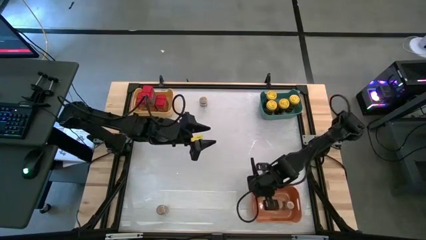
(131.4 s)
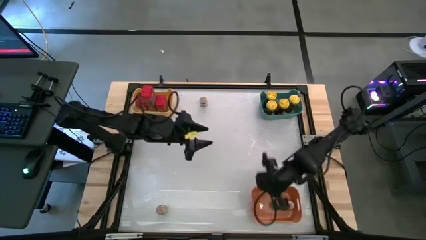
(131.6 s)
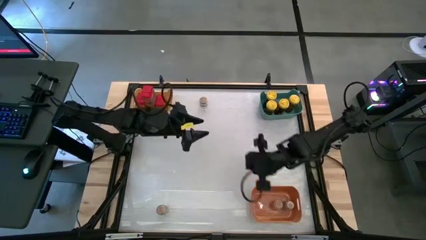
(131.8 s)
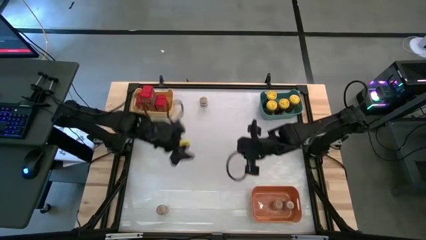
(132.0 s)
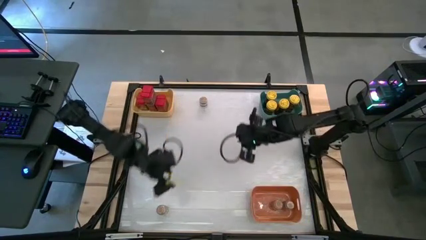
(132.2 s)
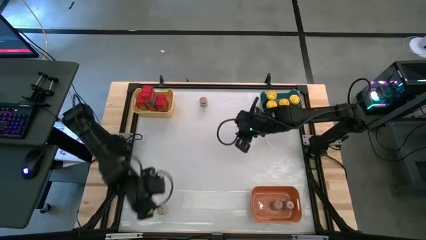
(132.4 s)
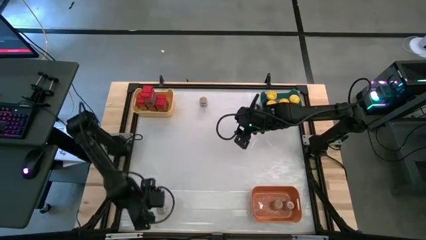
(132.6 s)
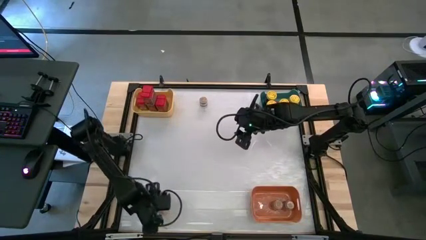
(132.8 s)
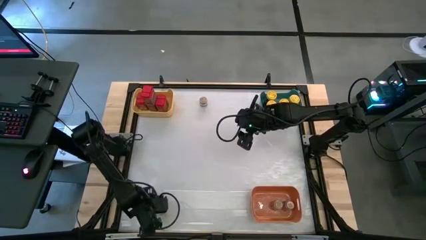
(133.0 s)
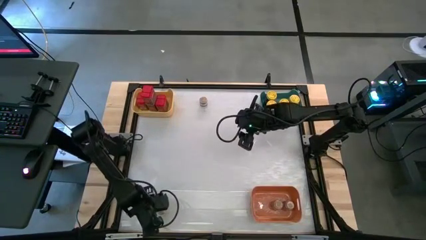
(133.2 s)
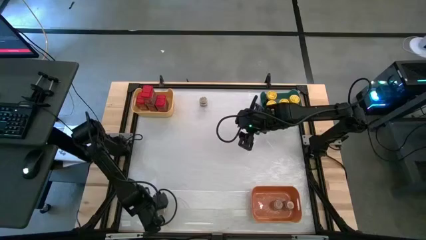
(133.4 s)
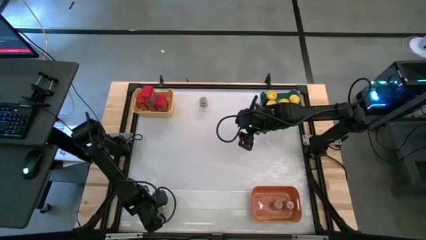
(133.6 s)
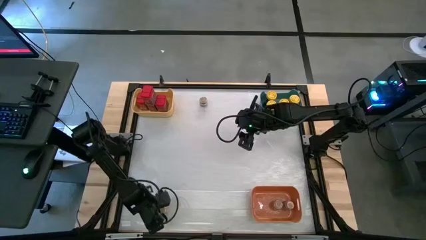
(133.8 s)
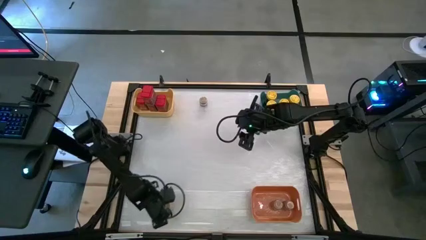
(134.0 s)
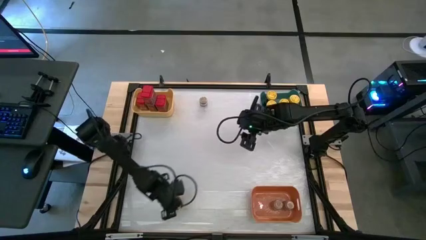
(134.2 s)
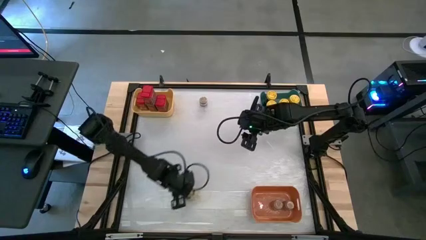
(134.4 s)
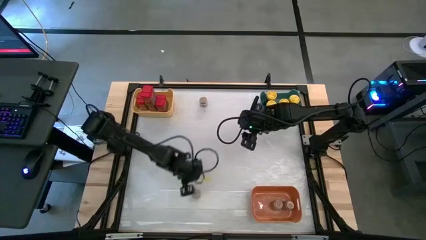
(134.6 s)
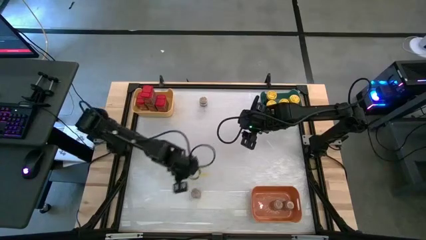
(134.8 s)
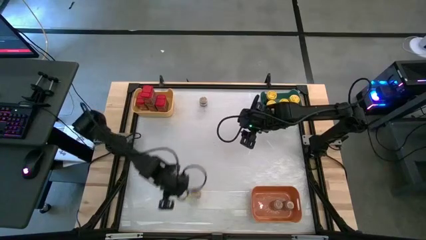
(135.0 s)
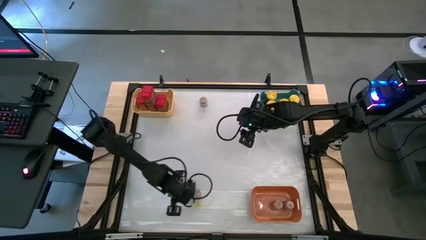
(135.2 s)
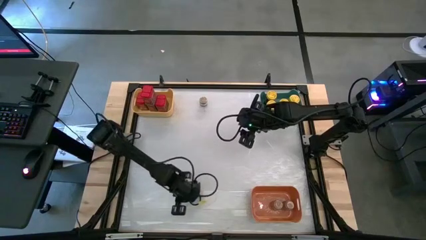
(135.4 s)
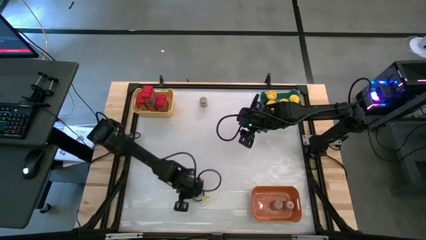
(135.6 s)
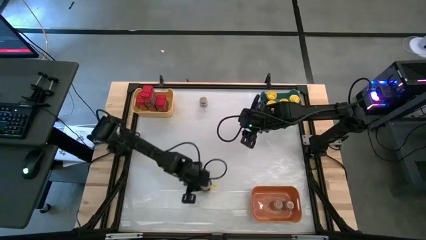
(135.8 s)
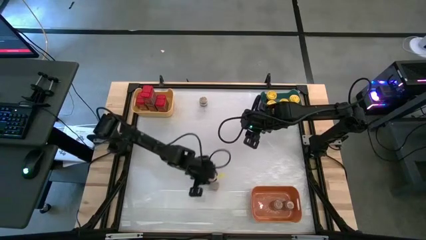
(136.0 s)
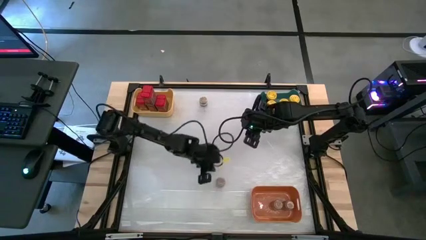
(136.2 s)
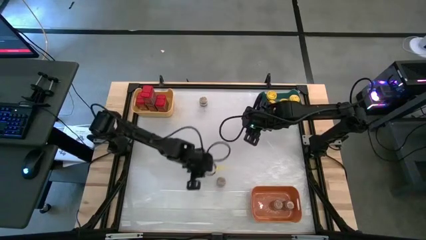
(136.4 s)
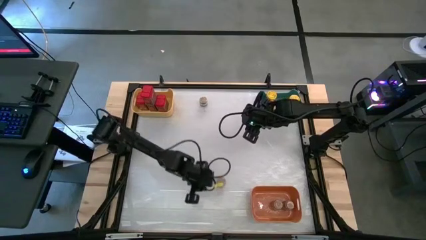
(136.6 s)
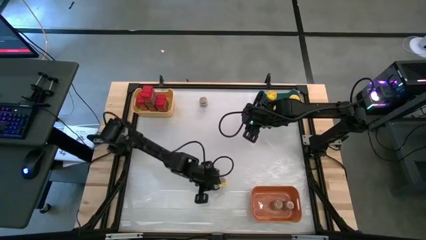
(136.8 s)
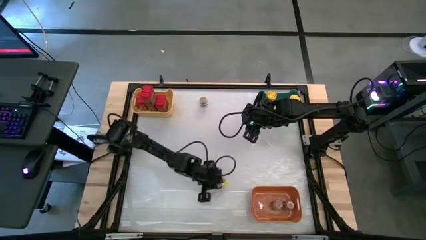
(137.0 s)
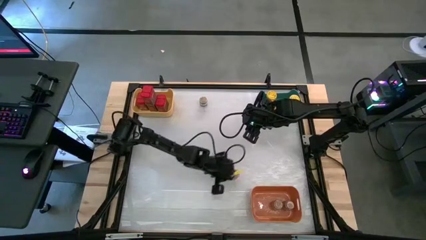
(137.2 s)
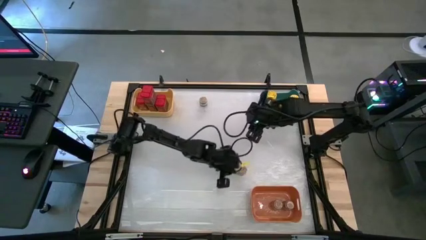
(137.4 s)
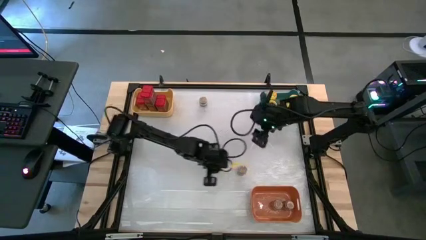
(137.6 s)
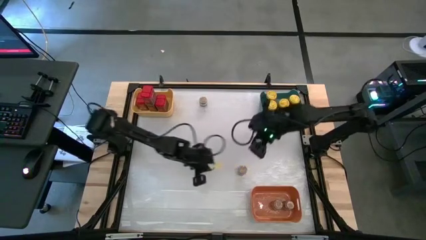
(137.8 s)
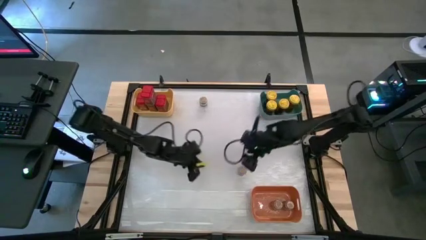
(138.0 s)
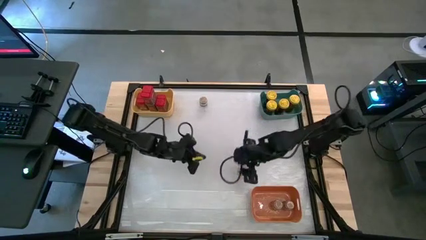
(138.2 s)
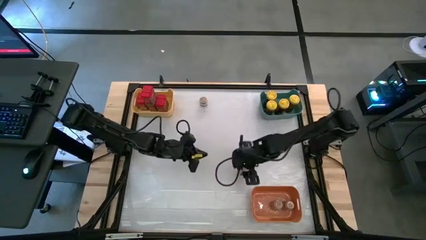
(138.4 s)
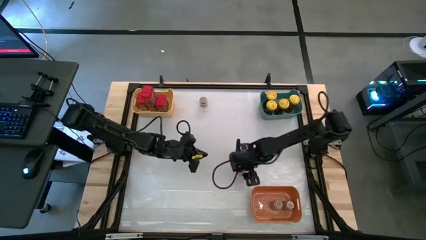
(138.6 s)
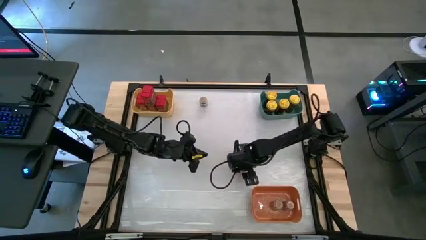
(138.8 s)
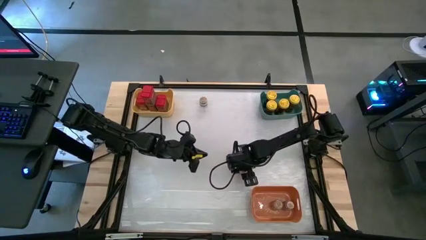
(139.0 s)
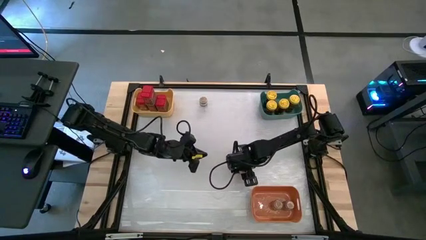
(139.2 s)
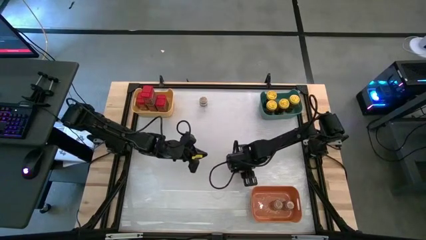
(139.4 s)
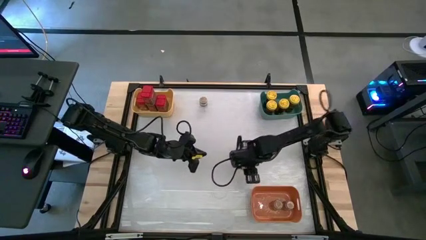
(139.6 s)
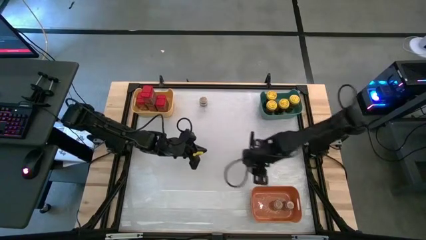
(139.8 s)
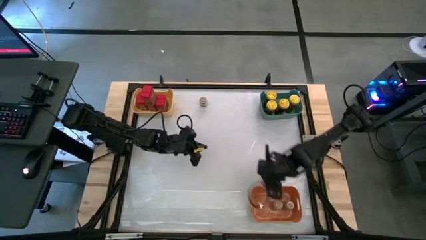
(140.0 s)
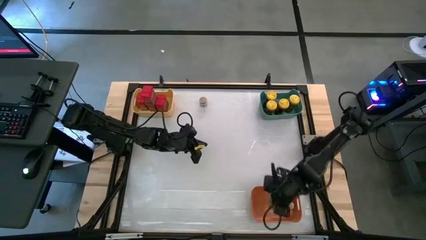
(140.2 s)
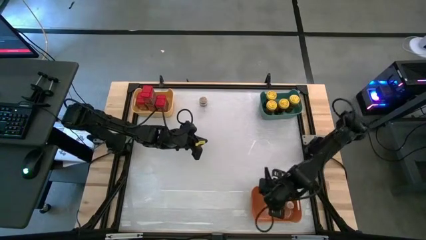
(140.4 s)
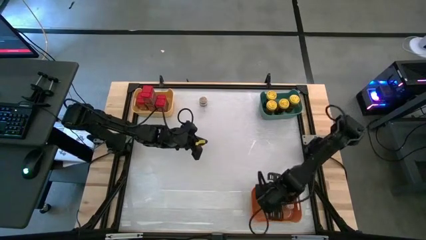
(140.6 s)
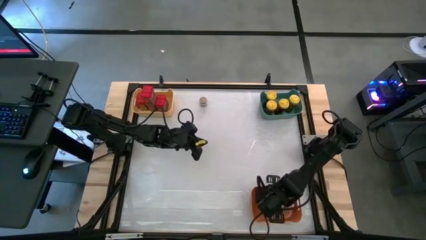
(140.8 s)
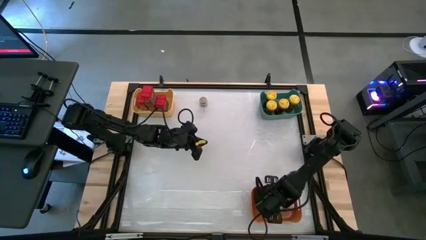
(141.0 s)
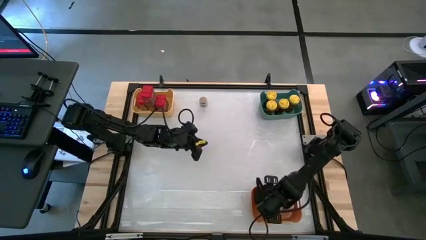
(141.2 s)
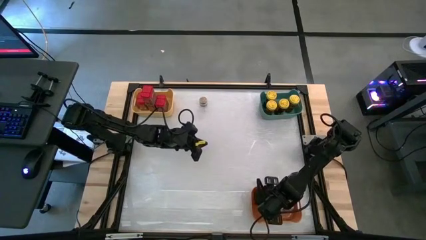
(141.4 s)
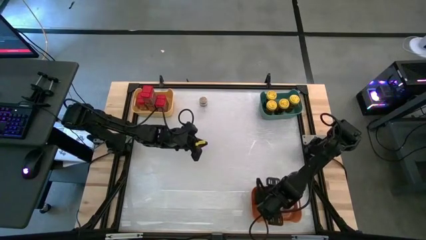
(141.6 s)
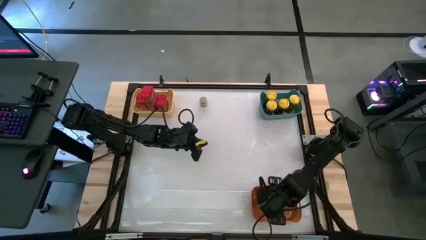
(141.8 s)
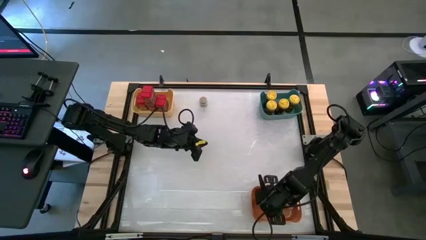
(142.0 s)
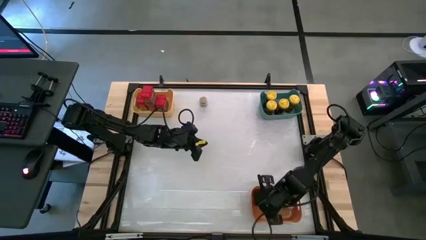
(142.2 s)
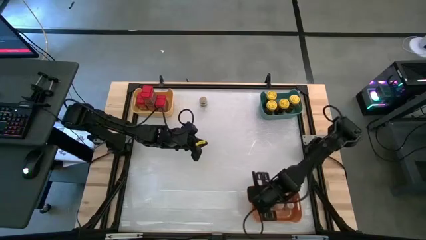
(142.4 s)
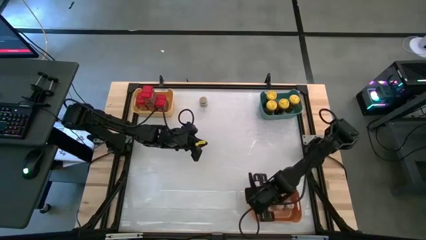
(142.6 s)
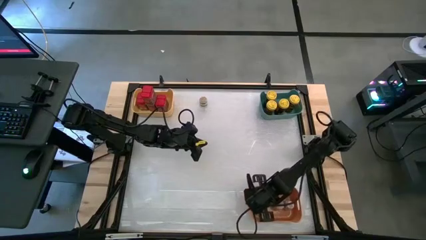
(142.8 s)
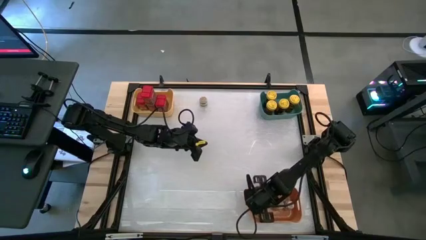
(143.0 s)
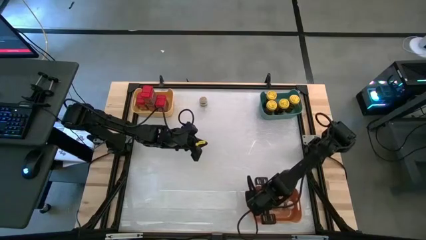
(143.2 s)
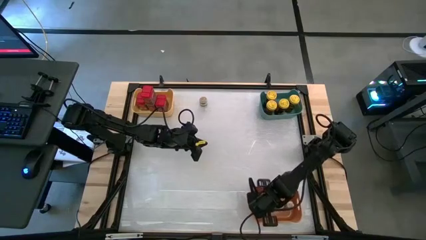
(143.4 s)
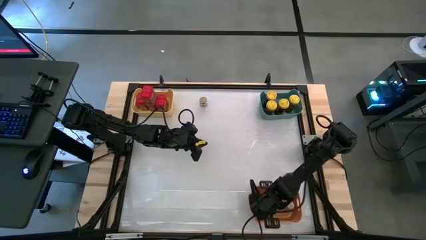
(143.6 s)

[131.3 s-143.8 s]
Task: Sort spices by type
Put the bottom brown seasoning bottle into the orange bin

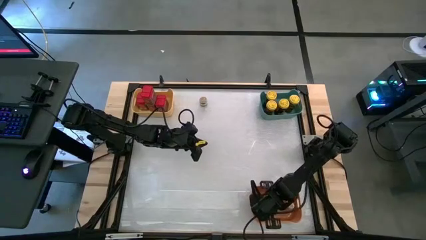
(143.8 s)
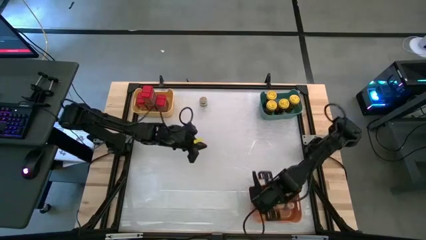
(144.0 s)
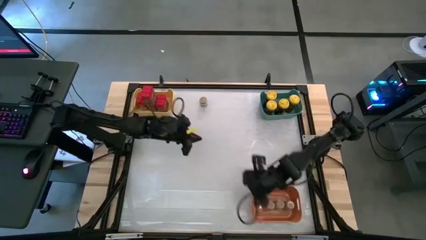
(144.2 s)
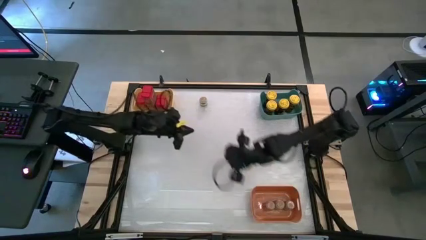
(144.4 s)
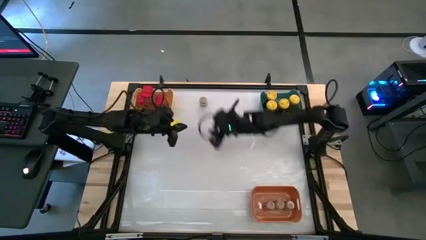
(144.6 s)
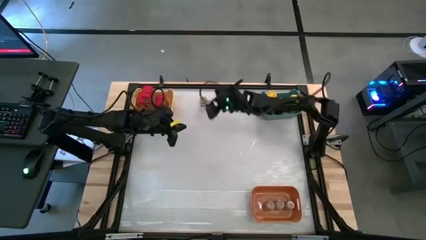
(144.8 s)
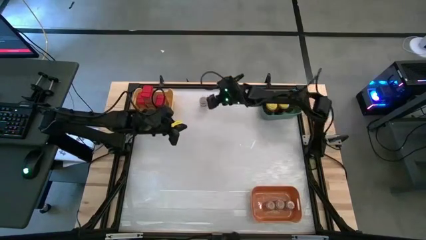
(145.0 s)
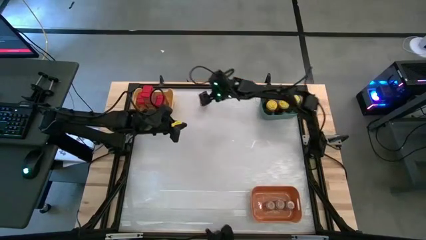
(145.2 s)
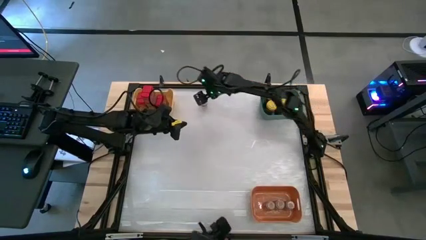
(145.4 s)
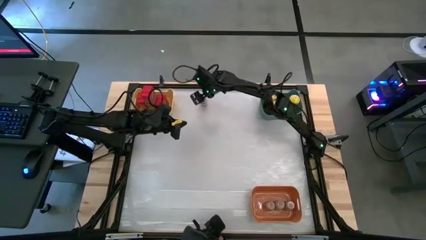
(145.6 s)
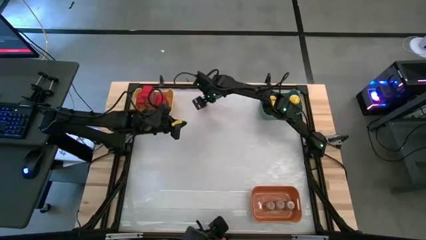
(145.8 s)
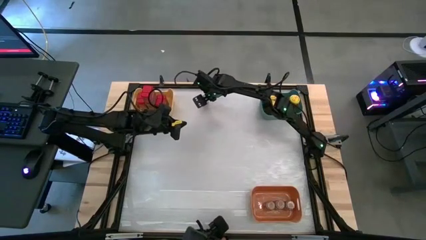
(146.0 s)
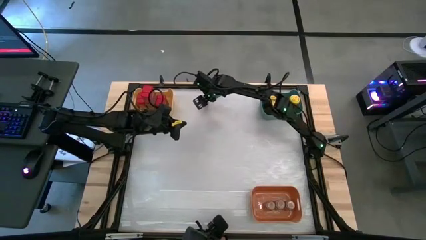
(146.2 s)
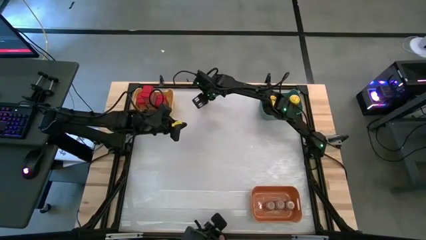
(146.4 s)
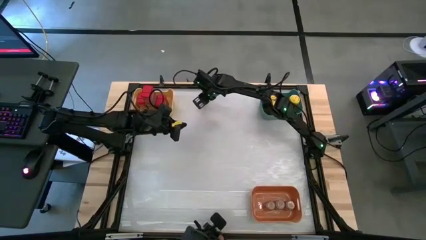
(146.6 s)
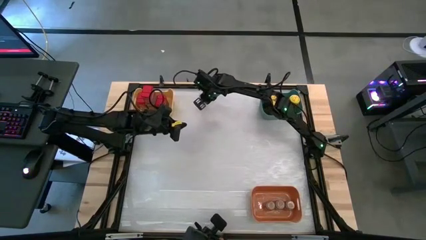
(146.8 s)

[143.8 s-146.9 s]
Put the brown seasoning bottle into the orange bin

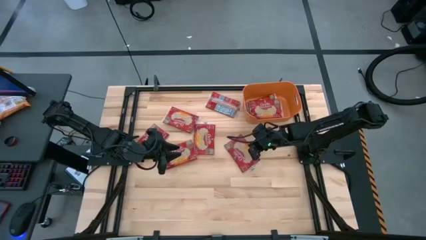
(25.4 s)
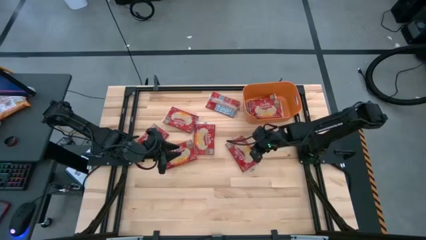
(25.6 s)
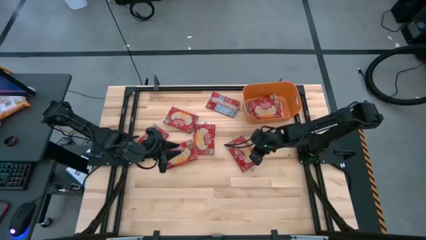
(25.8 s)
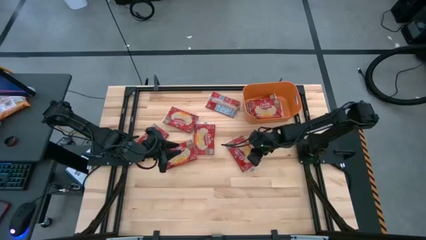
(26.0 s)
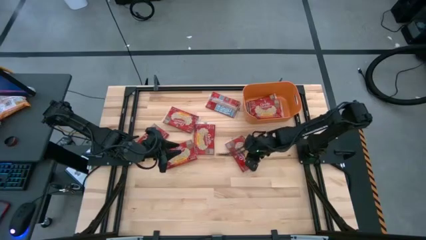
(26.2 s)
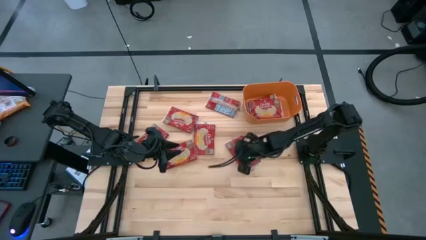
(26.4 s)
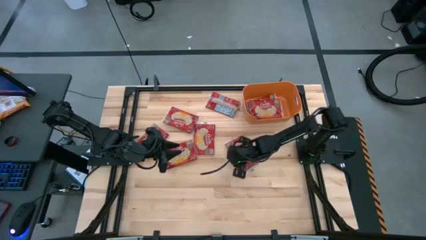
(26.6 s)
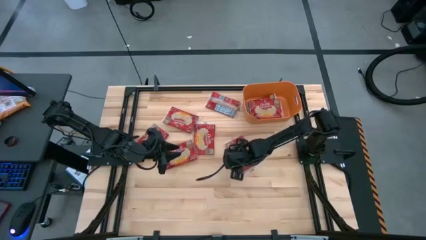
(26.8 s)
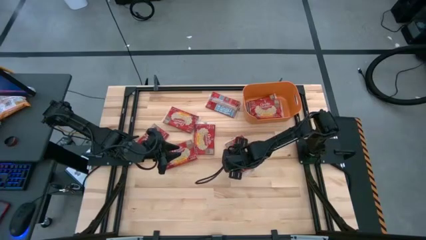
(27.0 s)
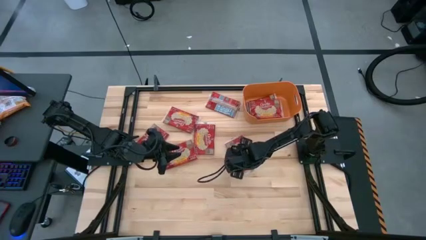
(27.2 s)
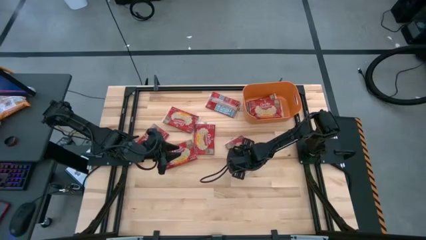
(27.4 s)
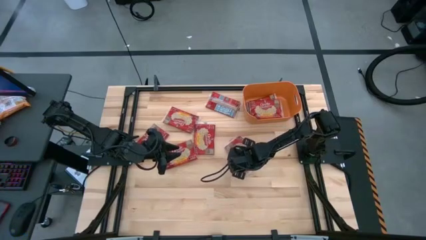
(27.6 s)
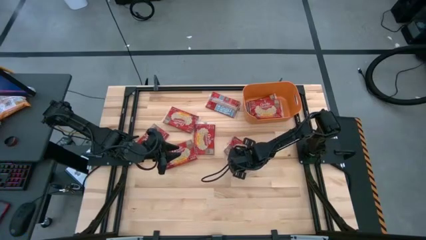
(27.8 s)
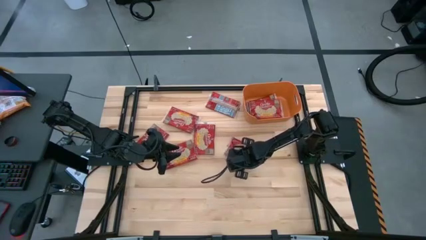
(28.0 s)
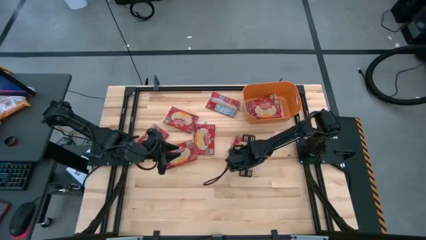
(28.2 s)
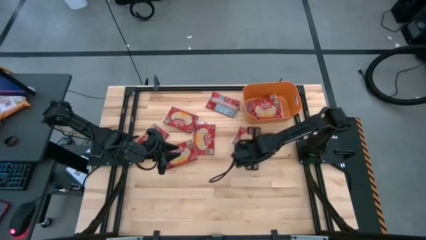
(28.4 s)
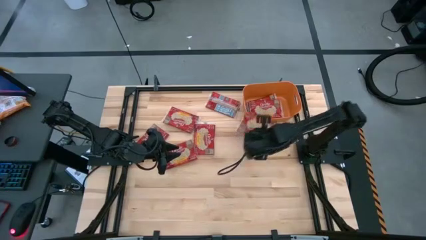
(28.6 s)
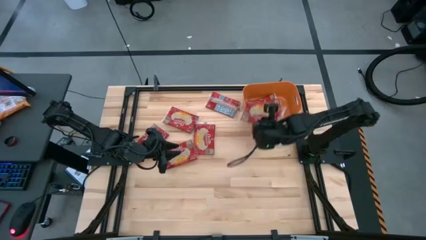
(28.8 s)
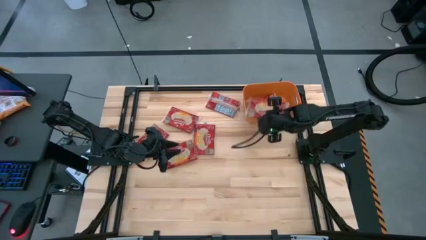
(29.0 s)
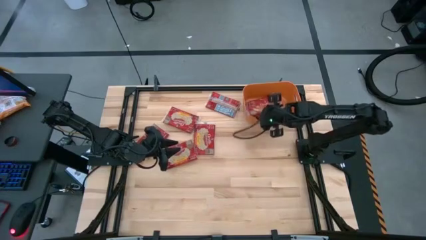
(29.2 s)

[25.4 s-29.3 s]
Task: Sort popcorn bags into baskets
Put the red popcorn bag into the orange bin
